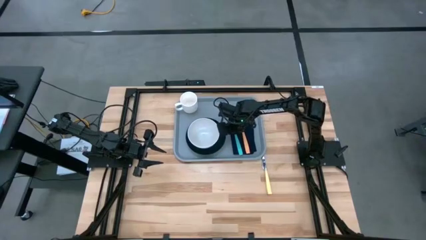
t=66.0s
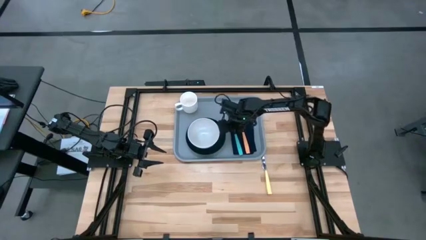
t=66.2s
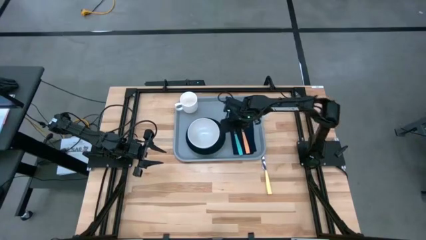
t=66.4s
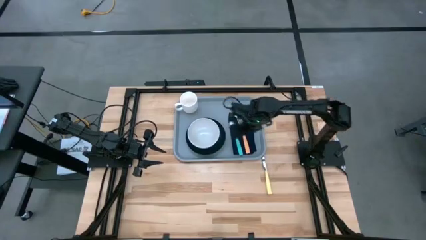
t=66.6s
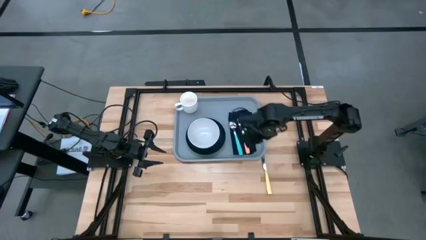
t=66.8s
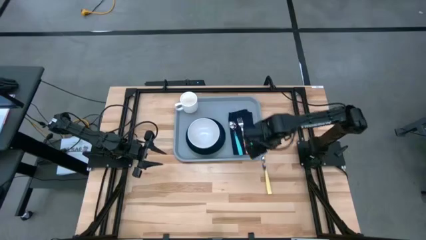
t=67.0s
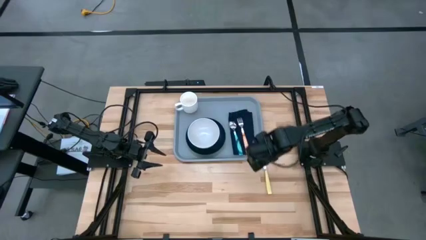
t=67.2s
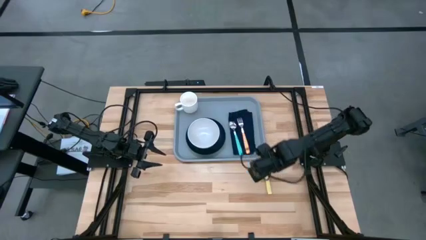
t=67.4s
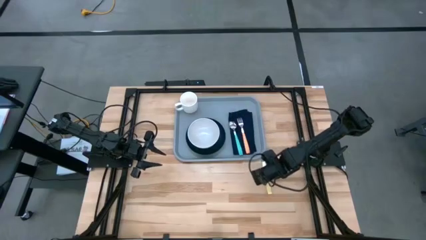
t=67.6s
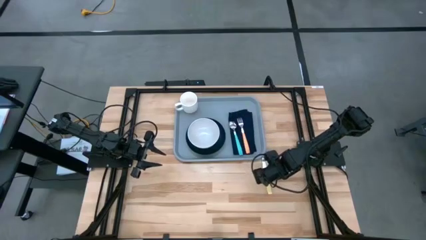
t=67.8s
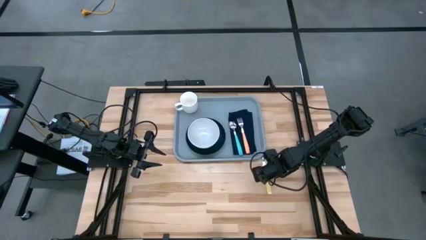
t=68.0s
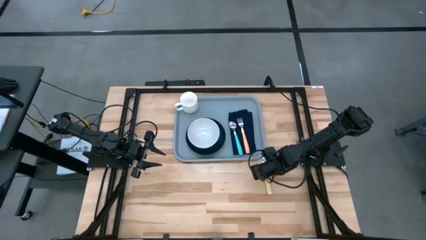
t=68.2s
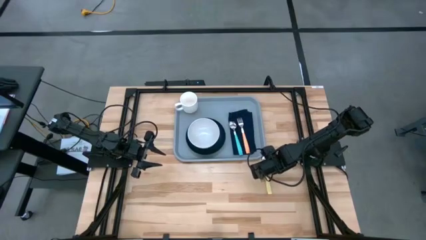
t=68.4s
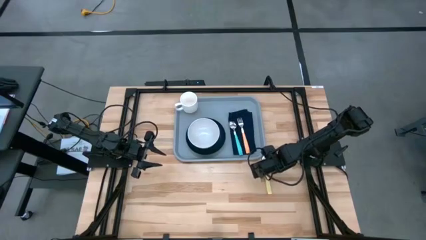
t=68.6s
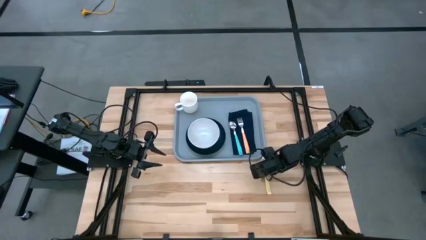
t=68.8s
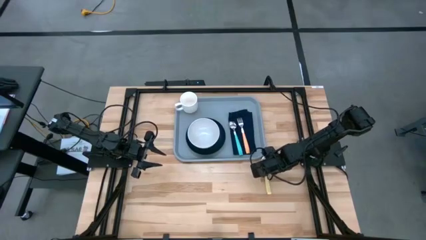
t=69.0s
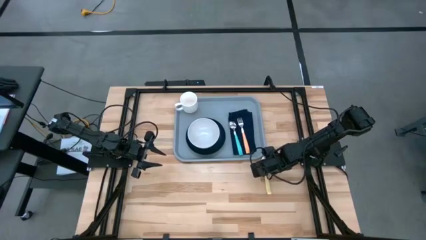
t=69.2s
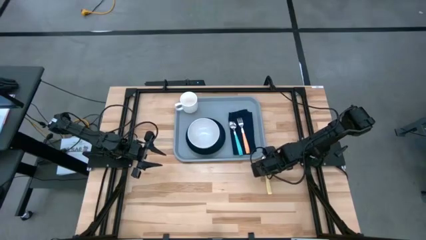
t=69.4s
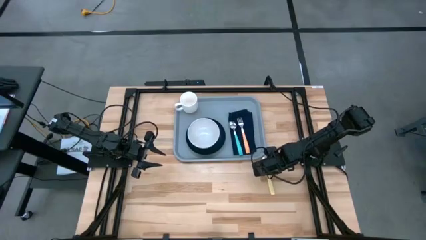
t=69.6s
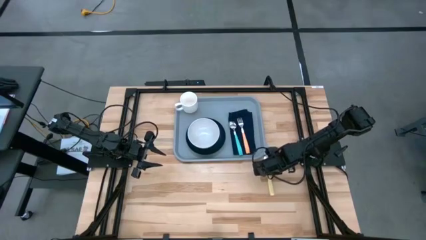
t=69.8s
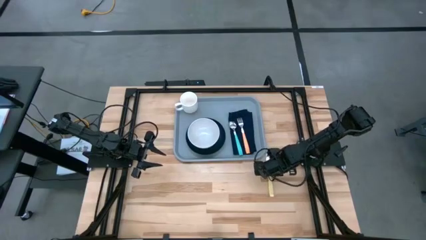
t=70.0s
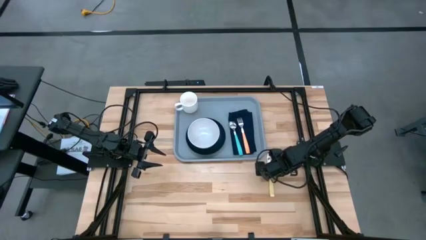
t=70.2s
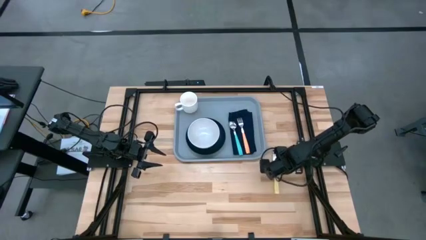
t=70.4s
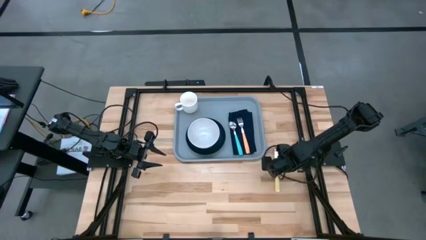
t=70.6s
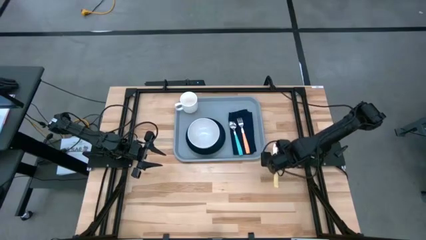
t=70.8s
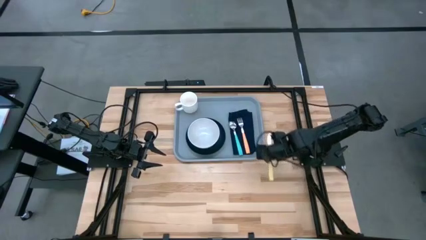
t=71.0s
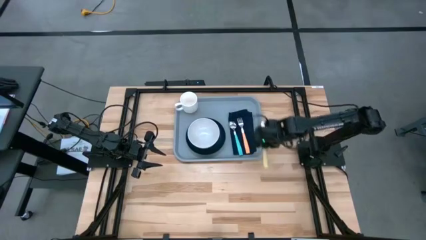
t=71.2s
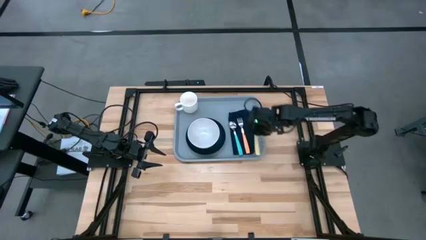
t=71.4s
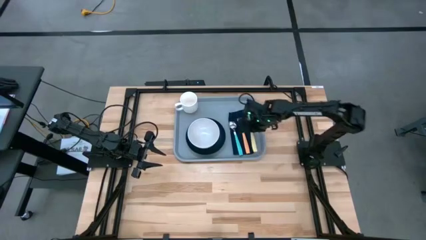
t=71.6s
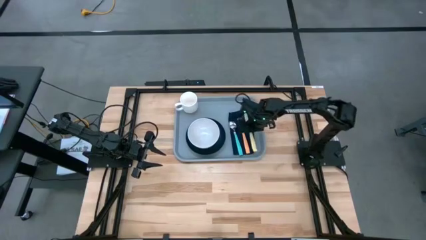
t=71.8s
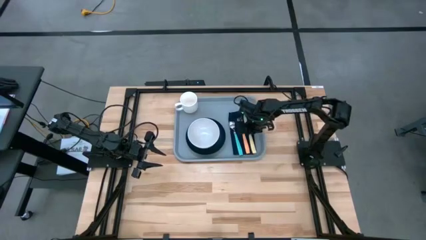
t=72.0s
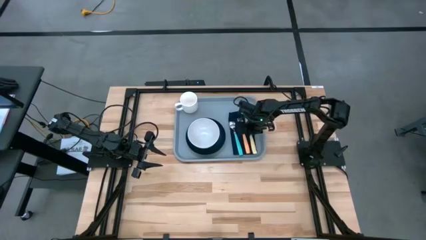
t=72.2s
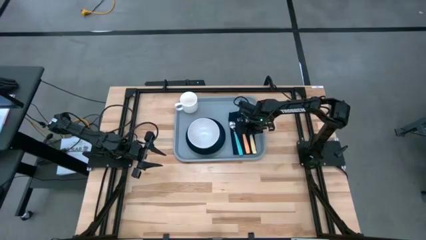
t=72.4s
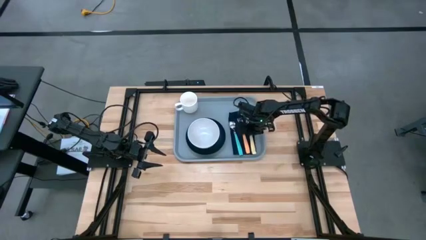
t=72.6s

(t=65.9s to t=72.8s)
Task: Set up tray
Put the yellow knife on the blue napkin to the right of the orange fork

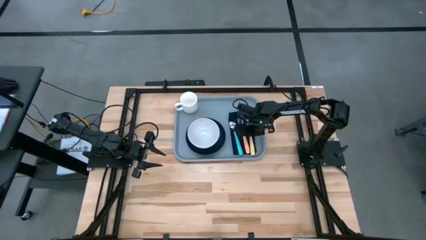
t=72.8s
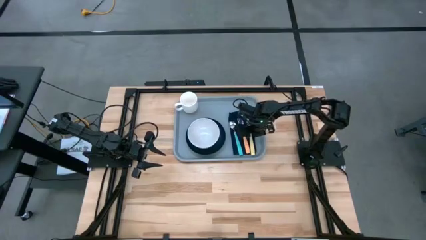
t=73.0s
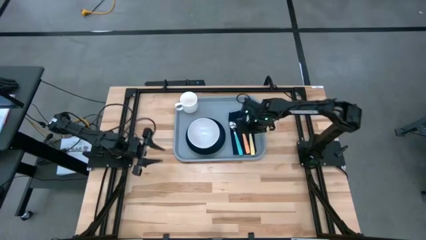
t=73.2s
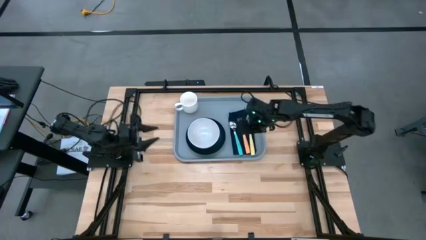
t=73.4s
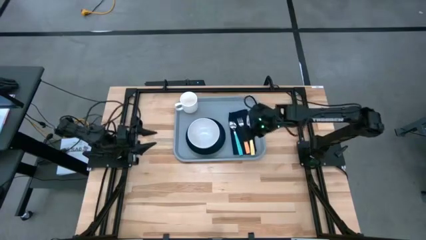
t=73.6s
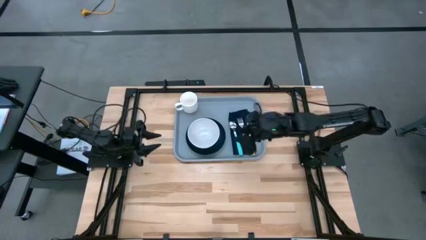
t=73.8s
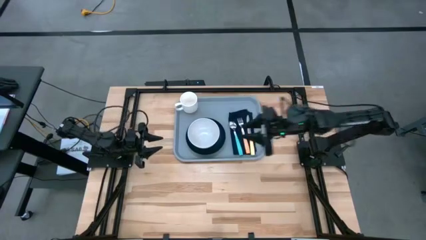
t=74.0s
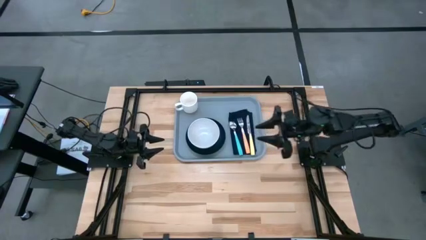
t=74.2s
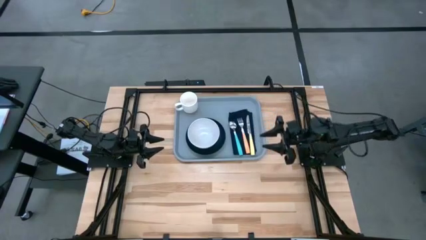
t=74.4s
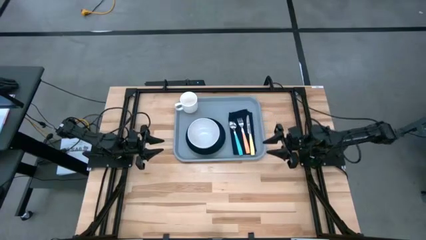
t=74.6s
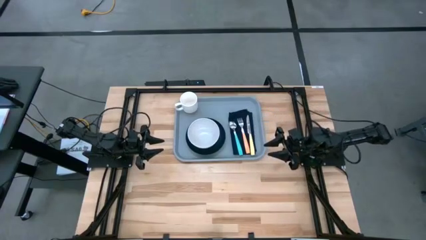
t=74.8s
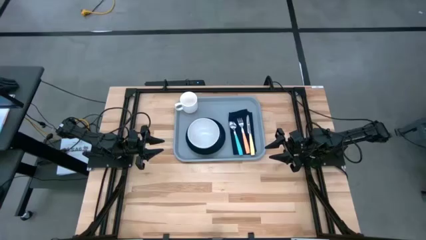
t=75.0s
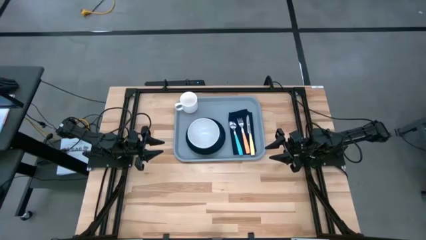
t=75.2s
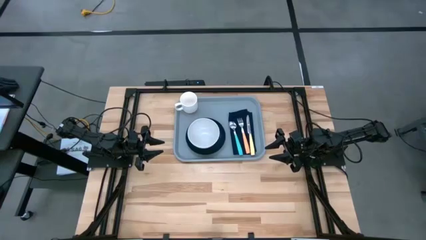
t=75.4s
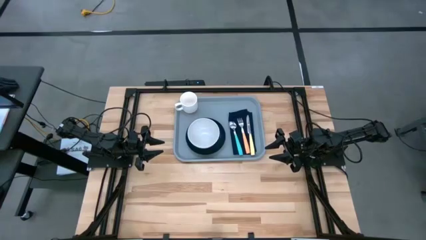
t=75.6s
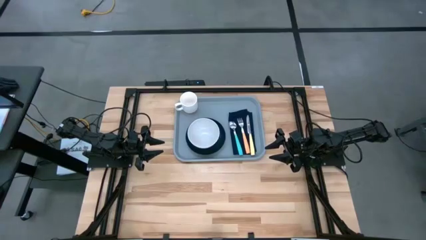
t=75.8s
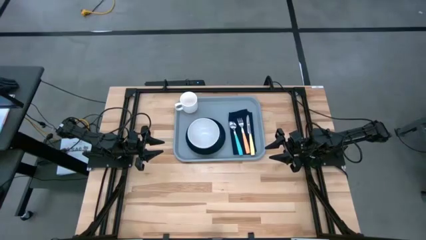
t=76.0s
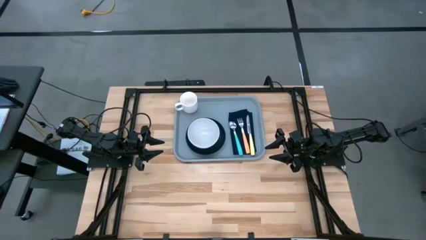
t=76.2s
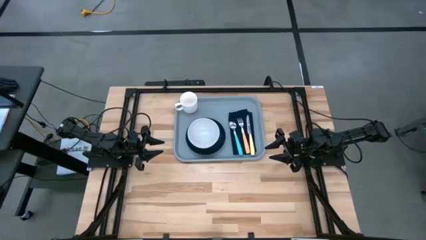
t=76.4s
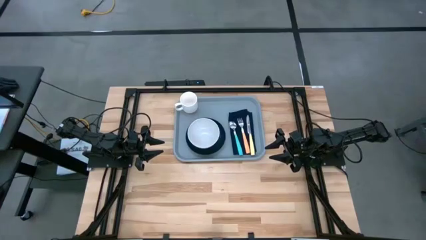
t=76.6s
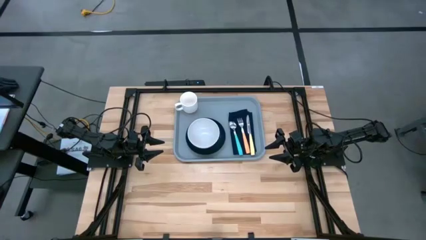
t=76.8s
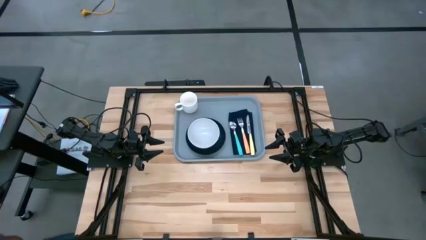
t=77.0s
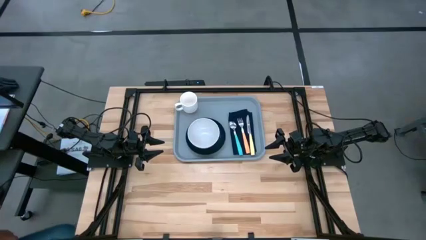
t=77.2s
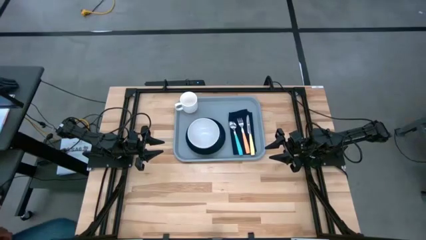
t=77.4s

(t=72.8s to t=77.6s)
Return to Home Position

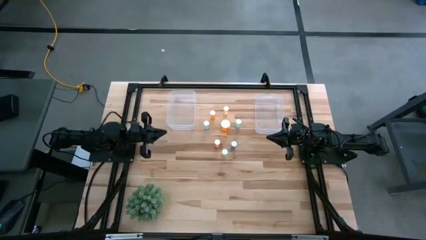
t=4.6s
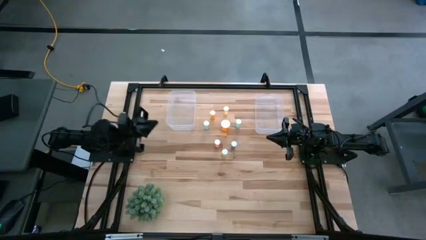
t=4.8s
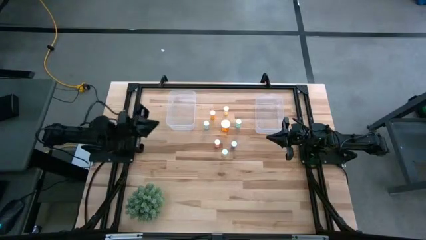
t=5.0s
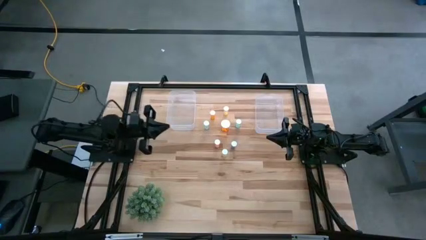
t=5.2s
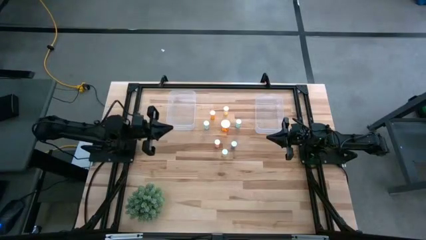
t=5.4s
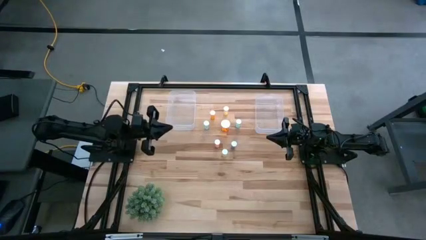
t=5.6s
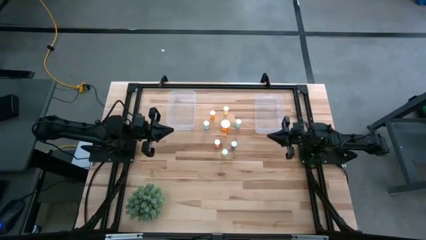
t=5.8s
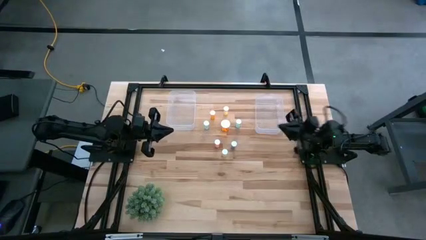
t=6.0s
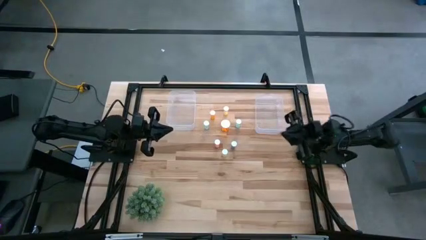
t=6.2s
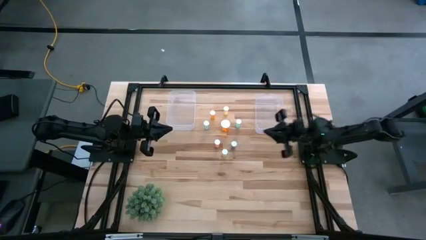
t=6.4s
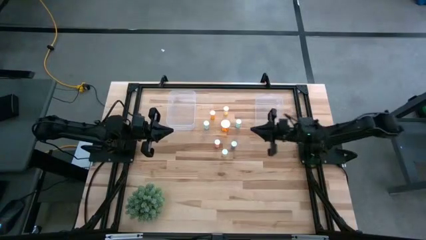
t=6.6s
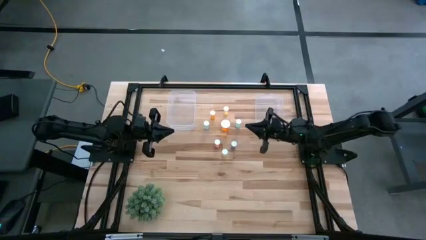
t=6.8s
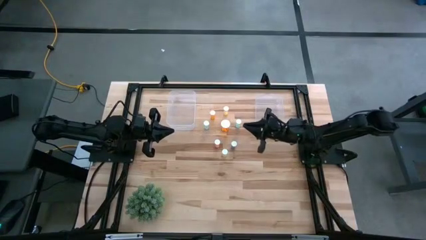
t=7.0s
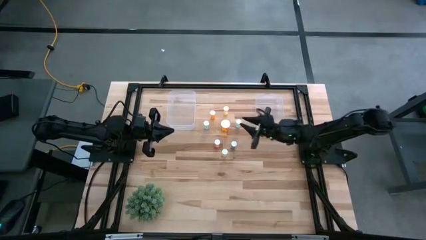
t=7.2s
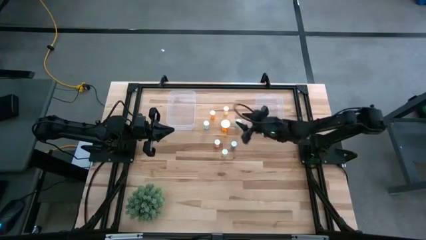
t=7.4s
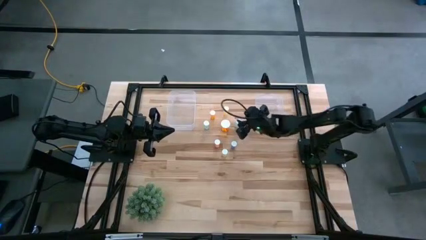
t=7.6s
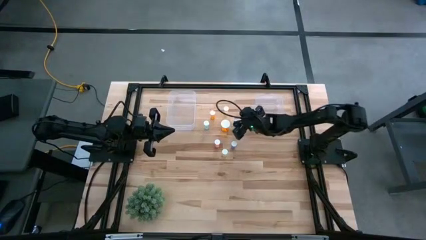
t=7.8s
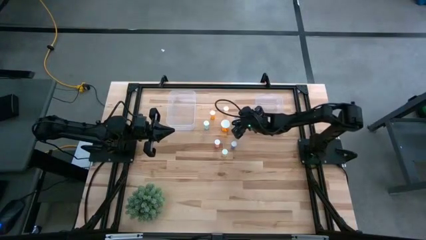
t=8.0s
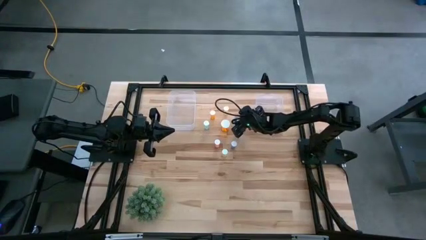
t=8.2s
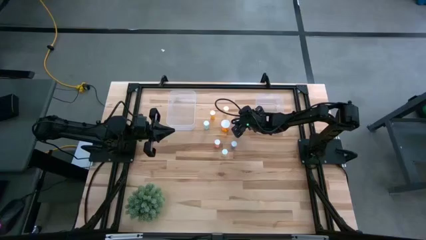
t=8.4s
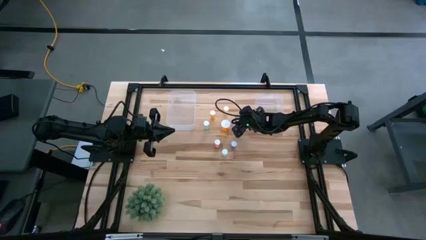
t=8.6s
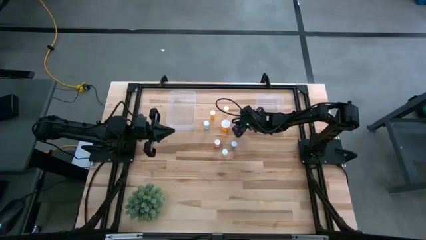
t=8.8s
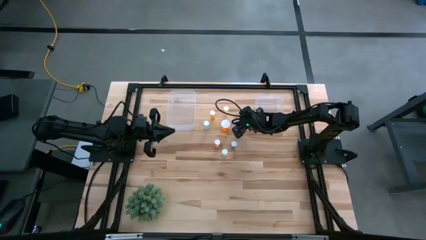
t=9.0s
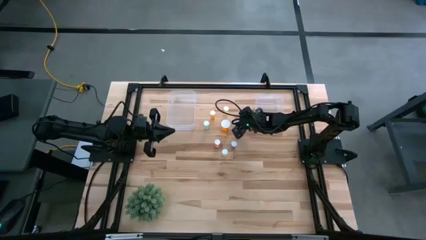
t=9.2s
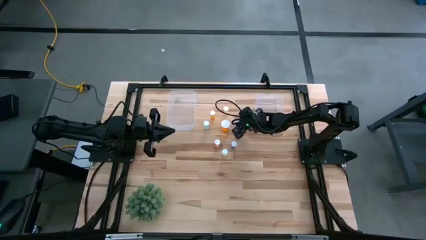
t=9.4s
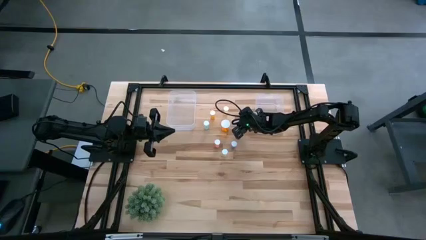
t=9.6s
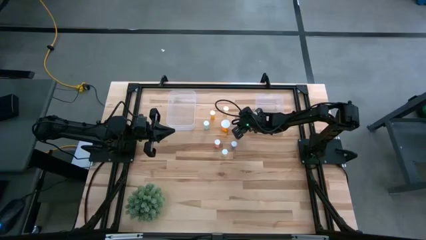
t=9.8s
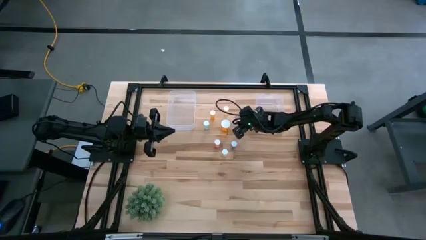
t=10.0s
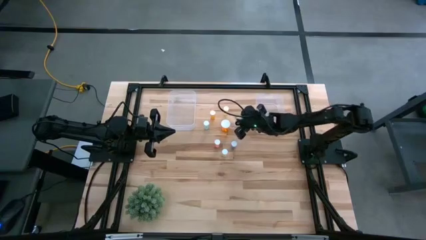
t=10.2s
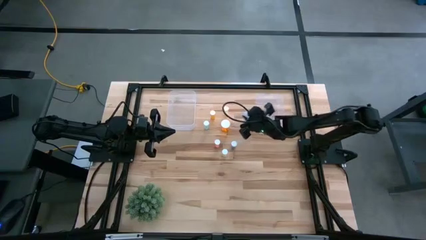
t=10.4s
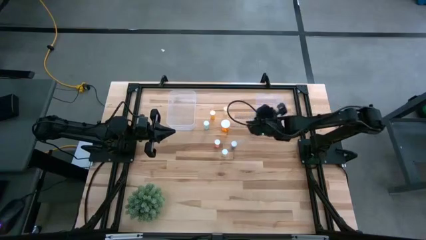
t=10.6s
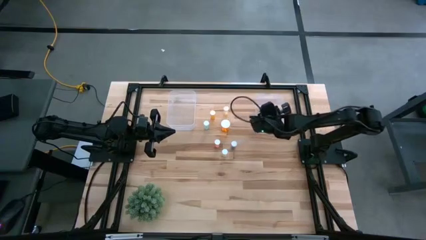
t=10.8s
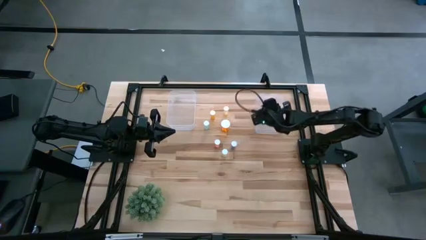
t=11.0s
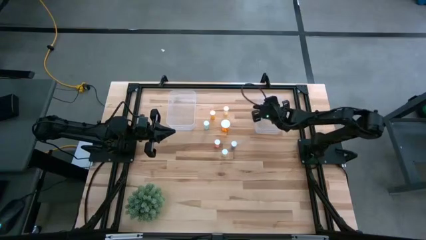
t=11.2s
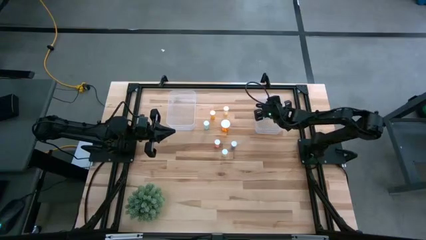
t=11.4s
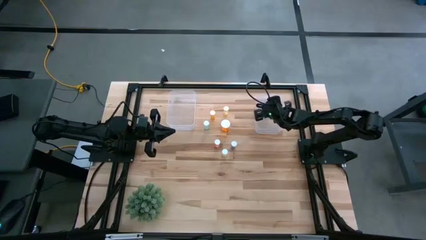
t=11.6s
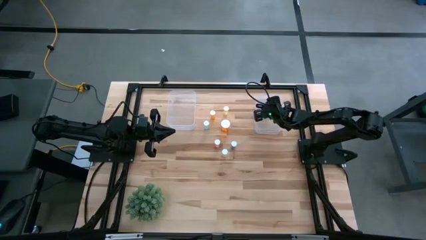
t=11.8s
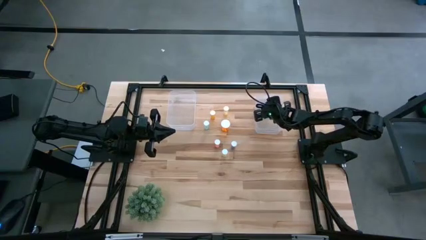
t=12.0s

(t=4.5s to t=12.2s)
Task: Pick and place medicine bottles into bin by pill shape (circle, oval)
Put the top right green tablet bottle into the right transparent bin
